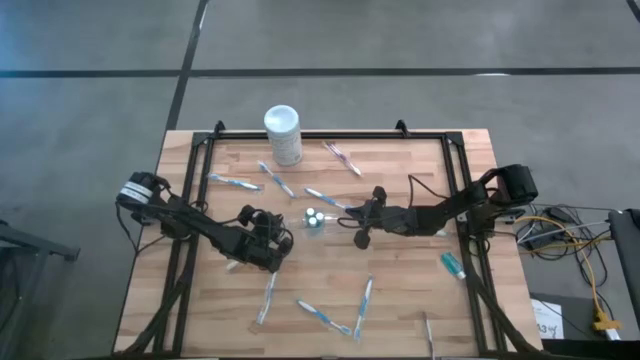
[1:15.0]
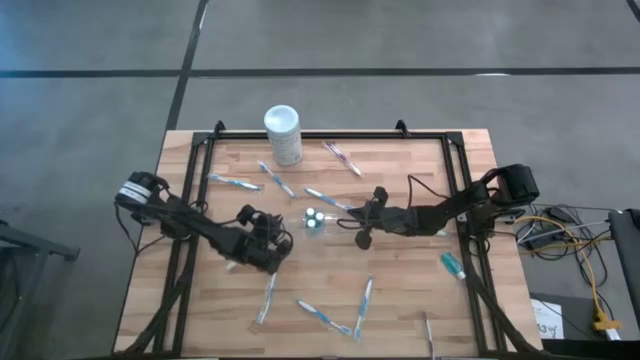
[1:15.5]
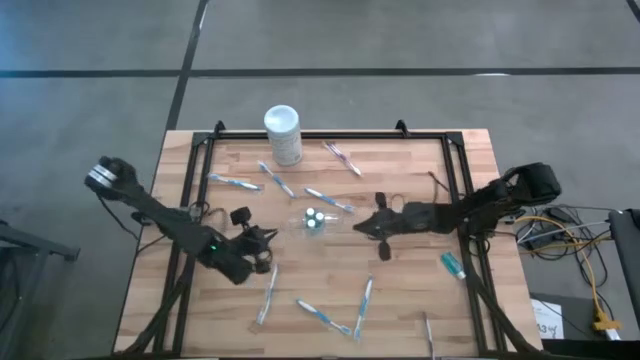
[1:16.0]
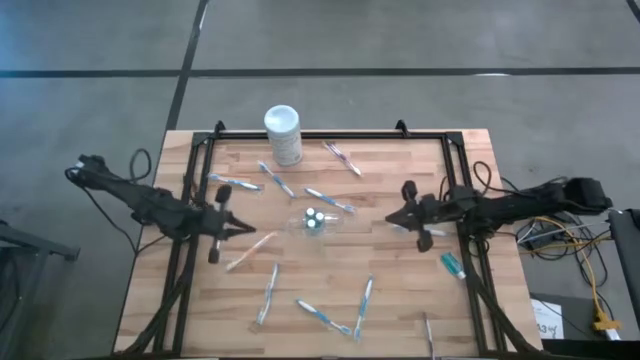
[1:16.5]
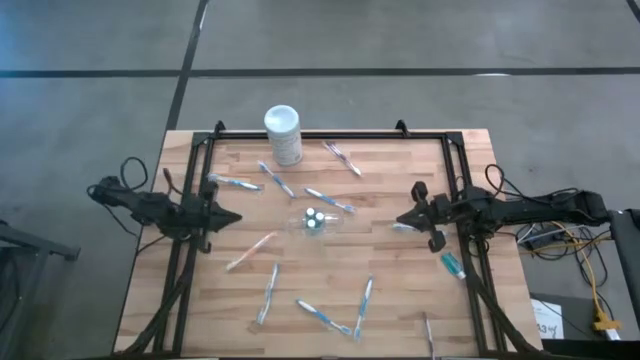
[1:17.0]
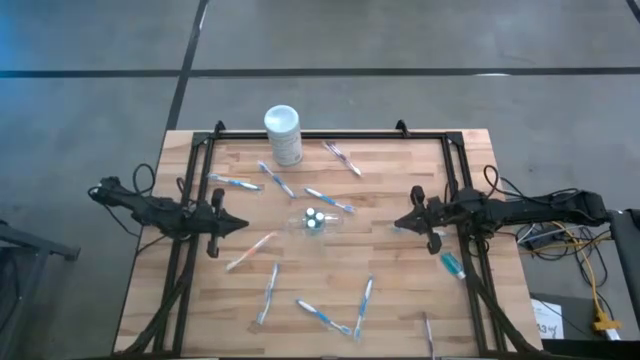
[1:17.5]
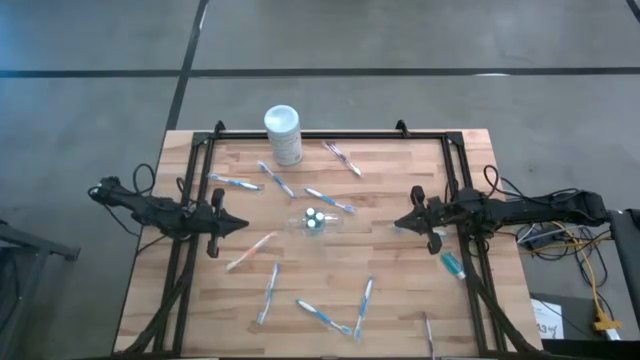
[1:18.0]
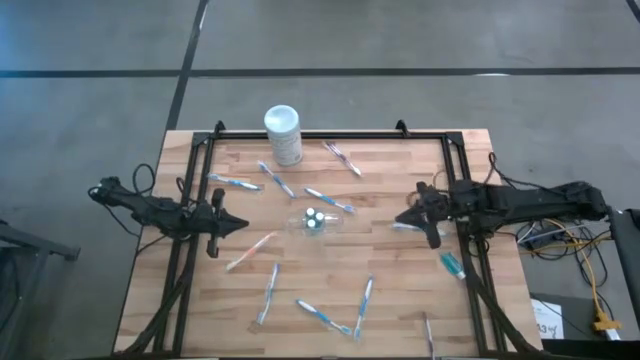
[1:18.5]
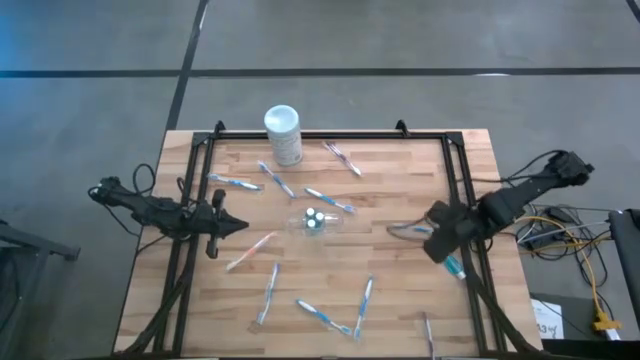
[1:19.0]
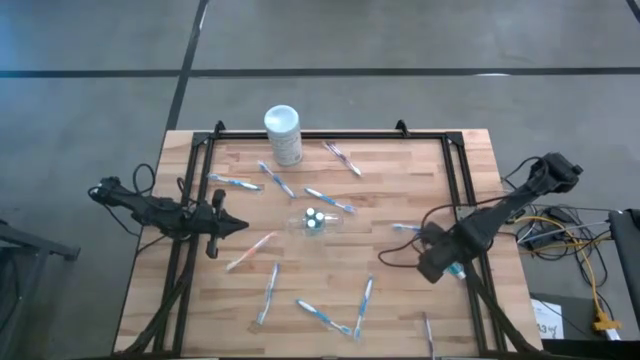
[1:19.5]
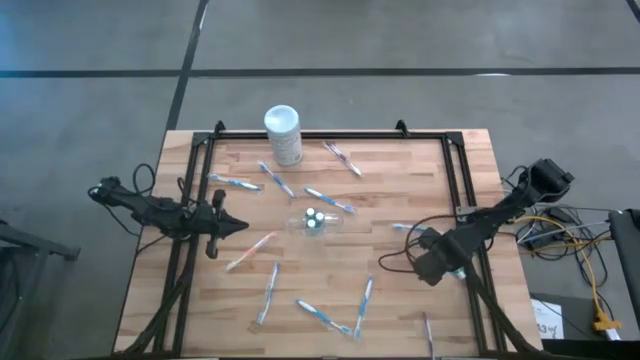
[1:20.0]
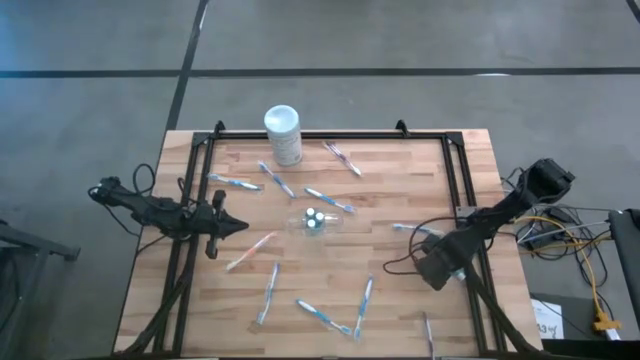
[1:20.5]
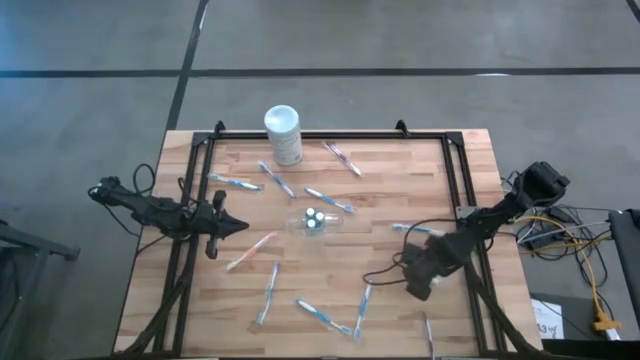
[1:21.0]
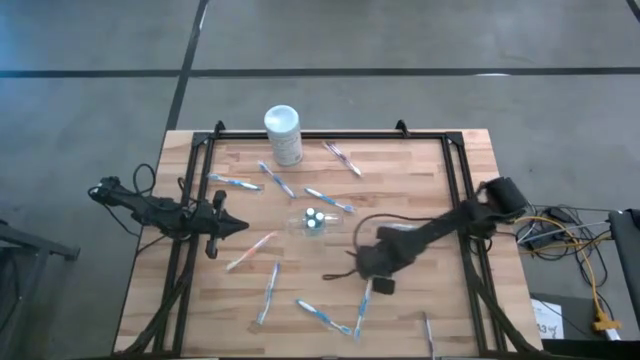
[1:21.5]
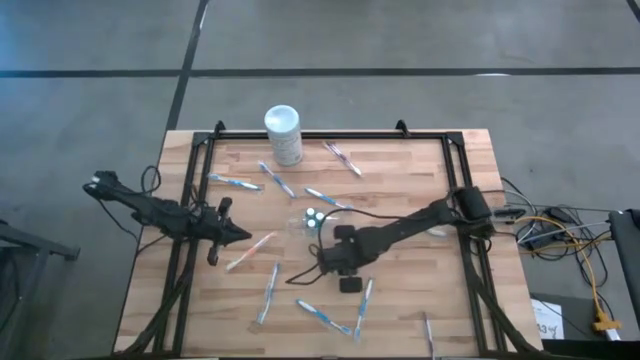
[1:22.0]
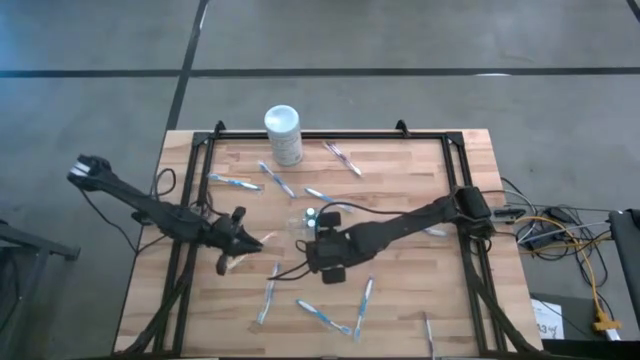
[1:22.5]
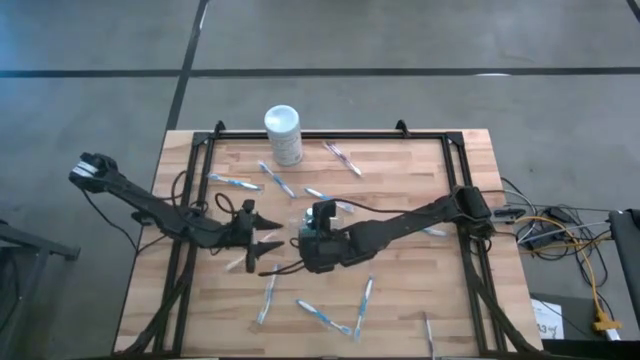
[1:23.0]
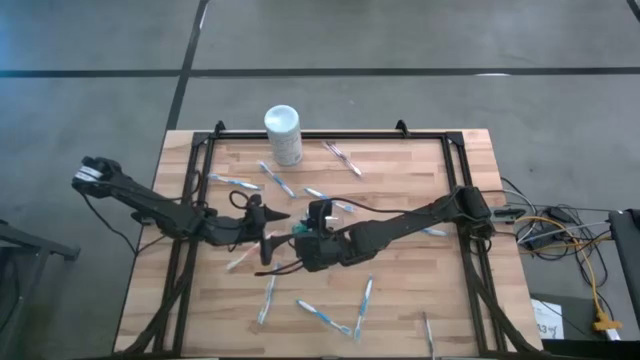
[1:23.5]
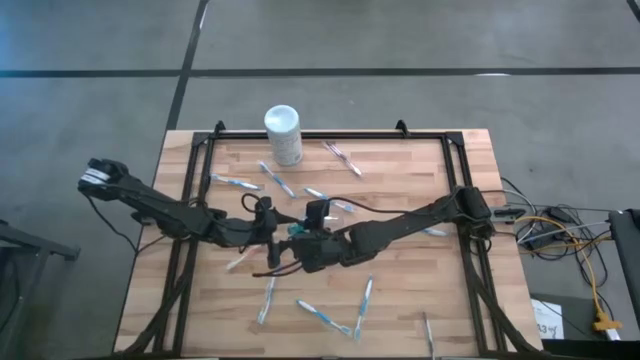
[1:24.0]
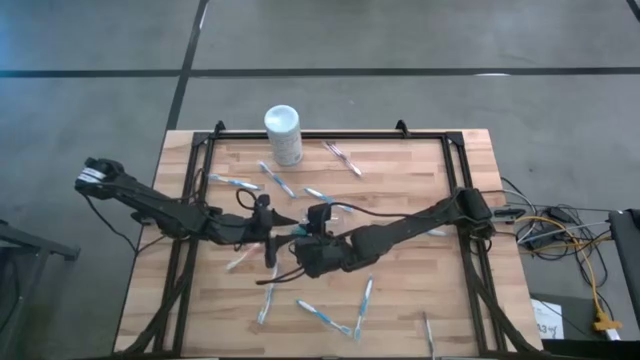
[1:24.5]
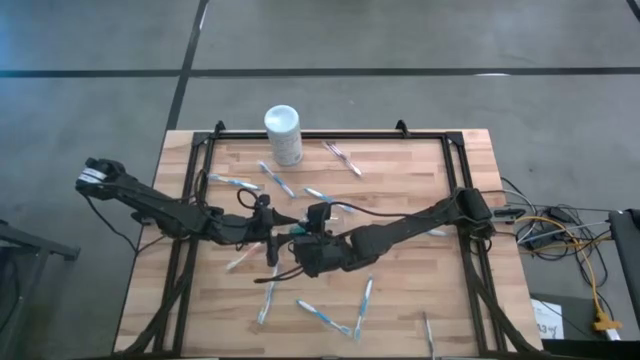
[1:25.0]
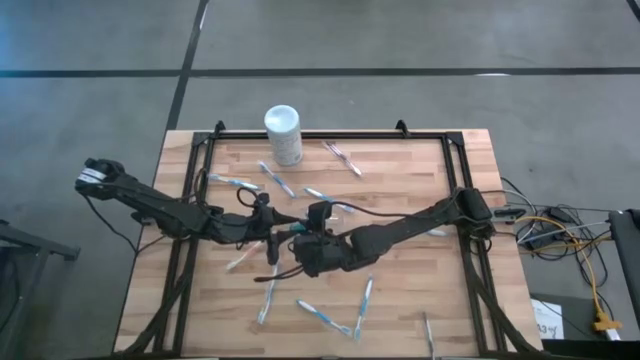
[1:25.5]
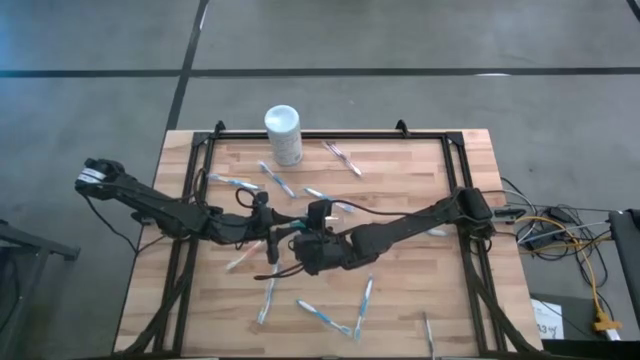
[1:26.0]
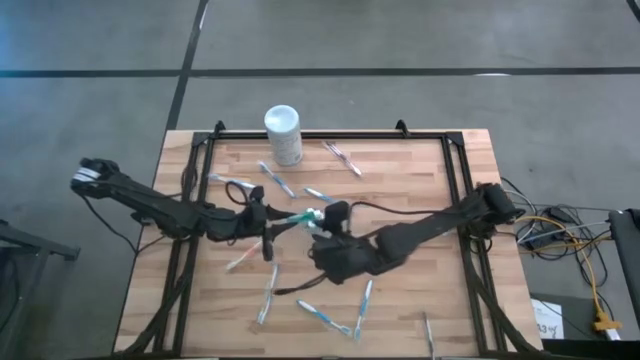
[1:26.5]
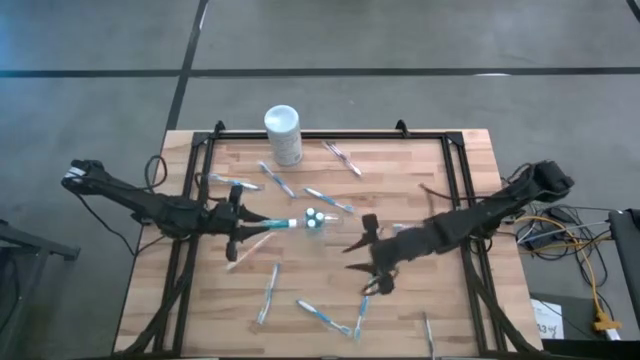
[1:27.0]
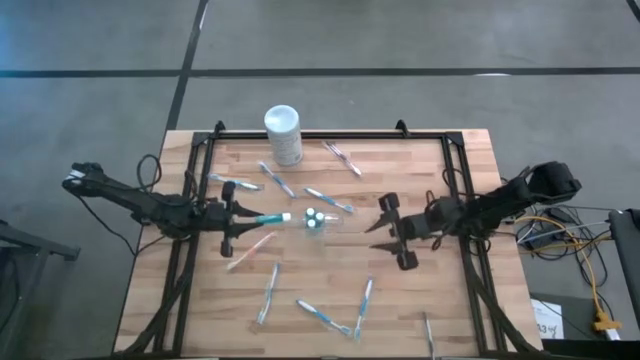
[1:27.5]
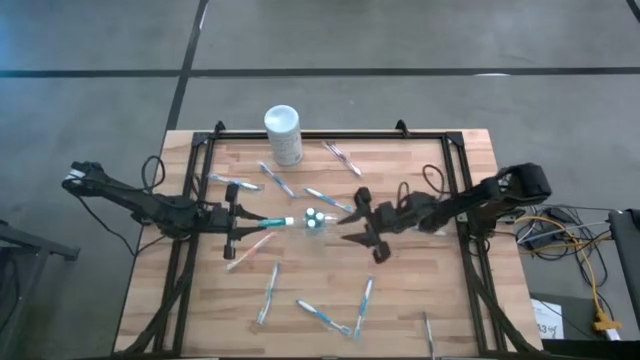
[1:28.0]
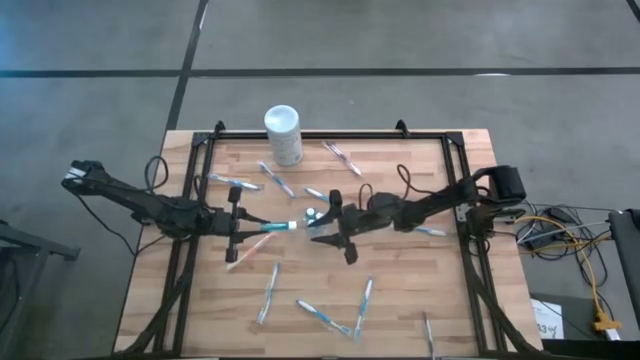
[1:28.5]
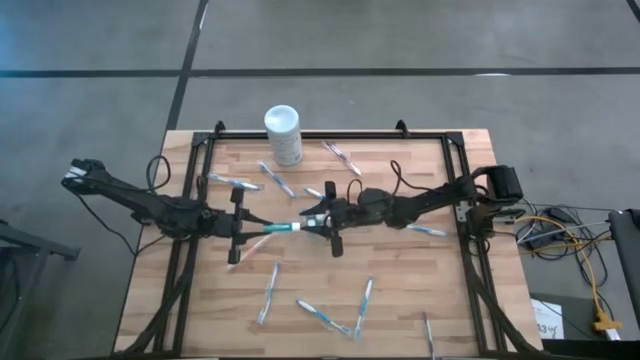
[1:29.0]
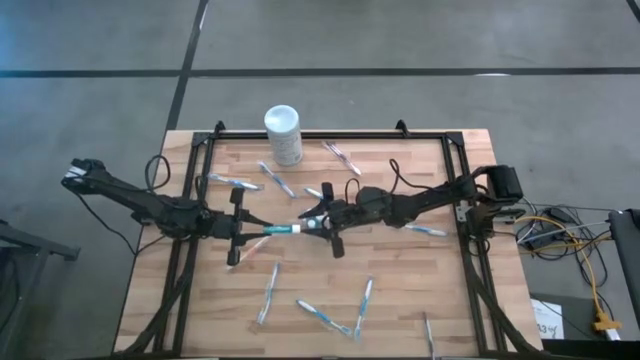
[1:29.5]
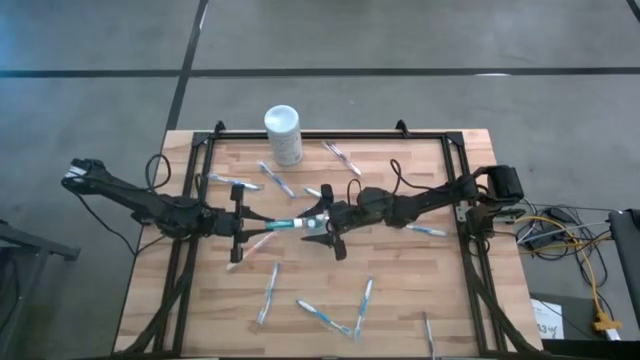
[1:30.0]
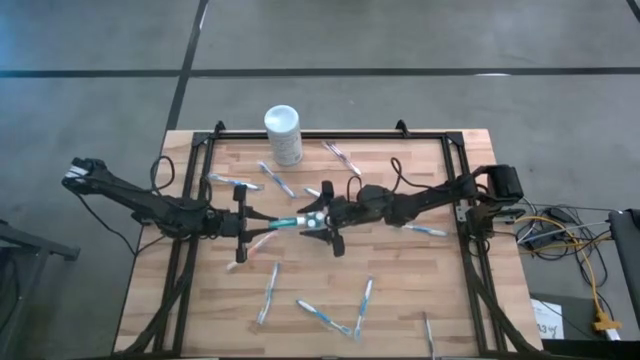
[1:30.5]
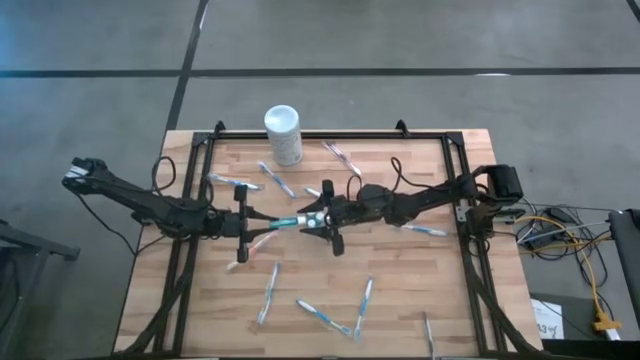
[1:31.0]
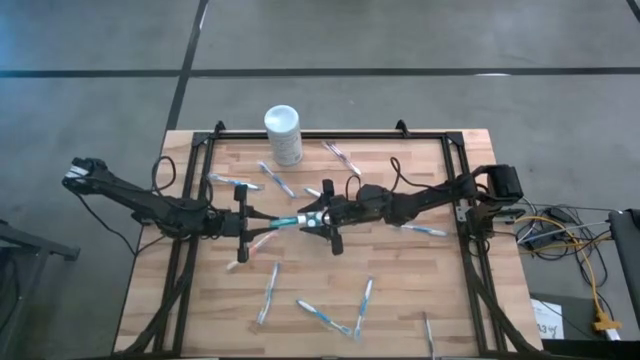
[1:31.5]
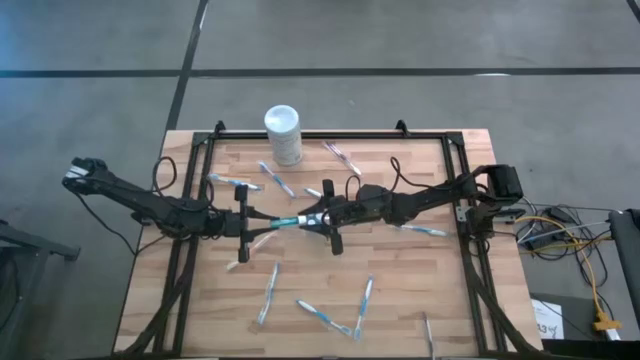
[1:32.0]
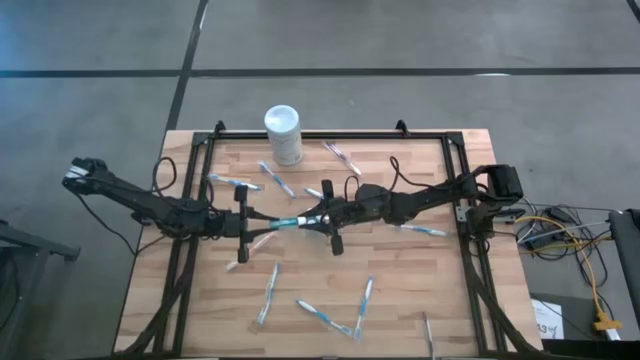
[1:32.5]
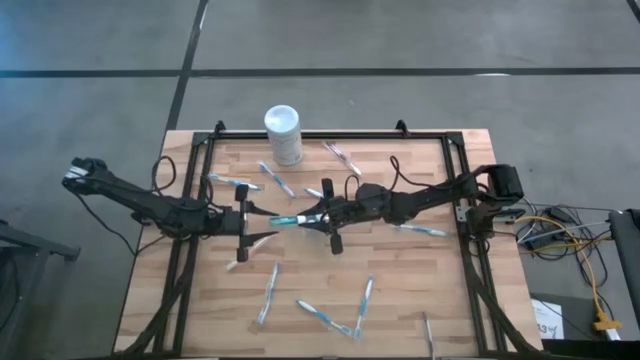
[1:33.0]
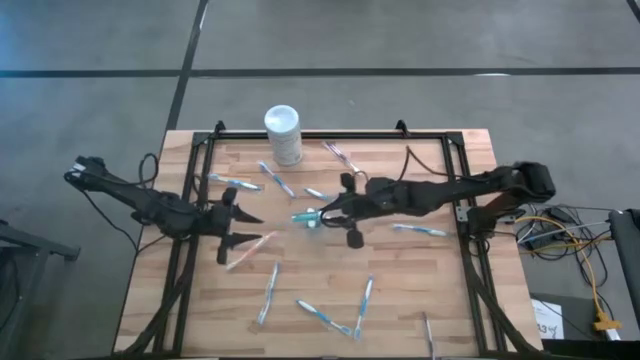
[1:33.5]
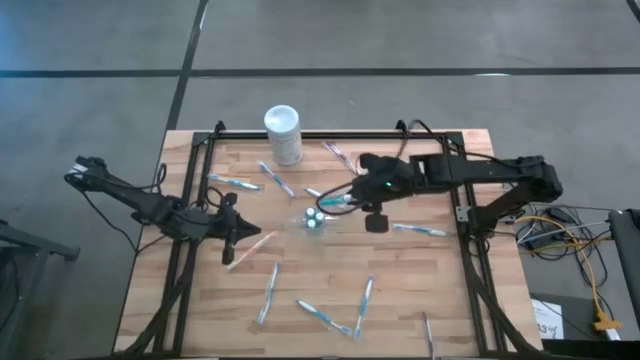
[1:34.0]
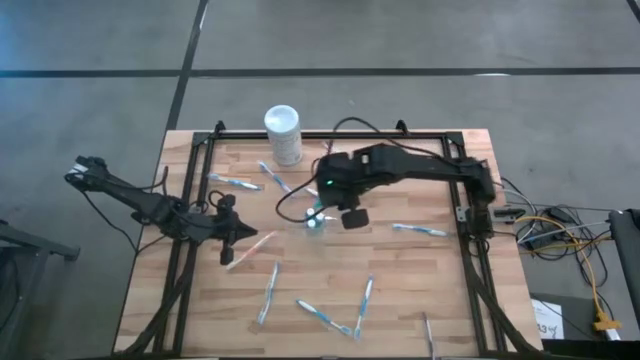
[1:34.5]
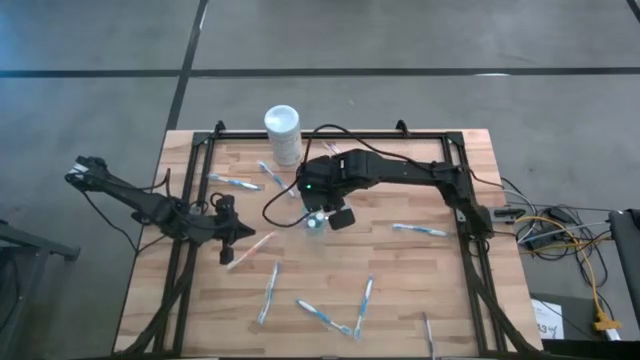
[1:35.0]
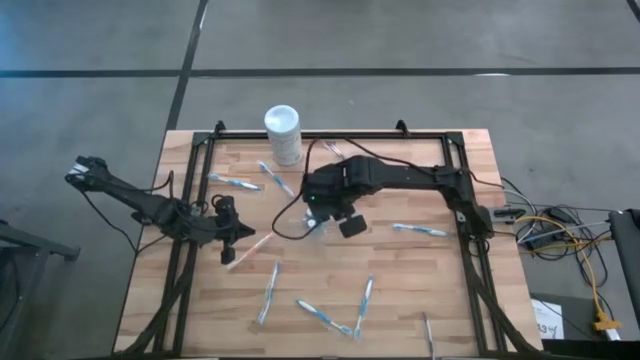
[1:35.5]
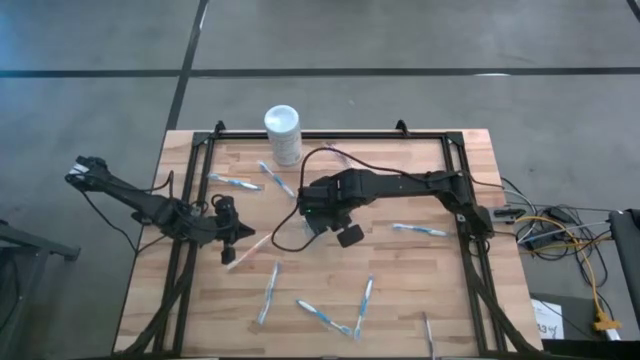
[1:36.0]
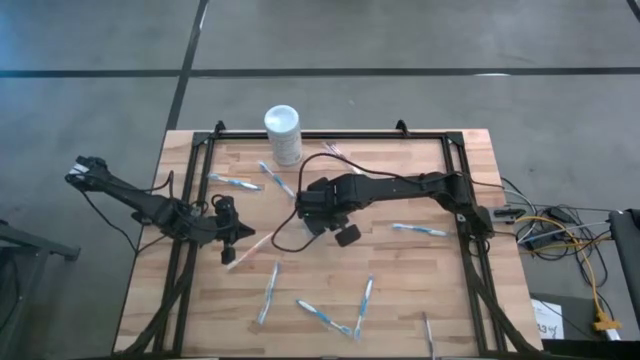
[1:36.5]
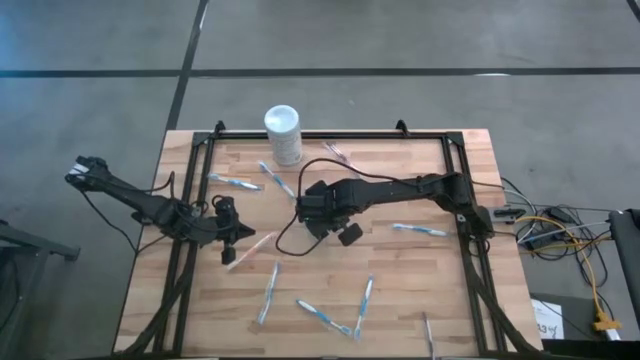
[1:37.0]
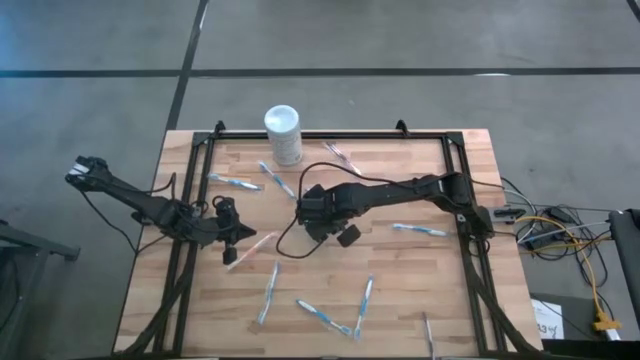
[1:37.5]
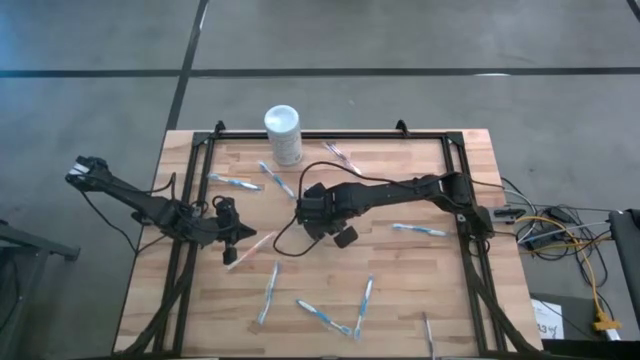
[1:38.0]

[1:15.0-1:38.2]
Task: Pick & Place toothbrushing station
Put the blue mouthwash into the transparent organizer
